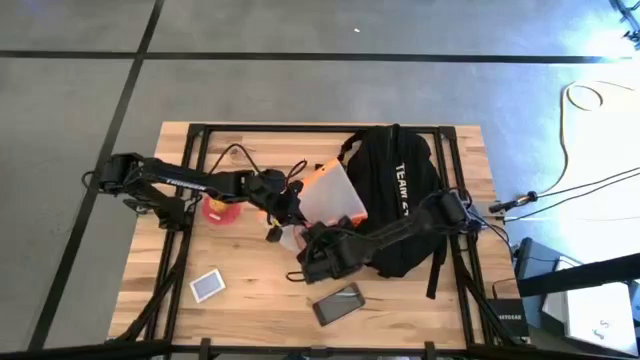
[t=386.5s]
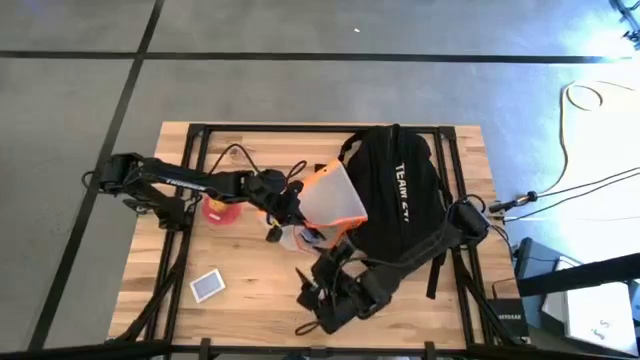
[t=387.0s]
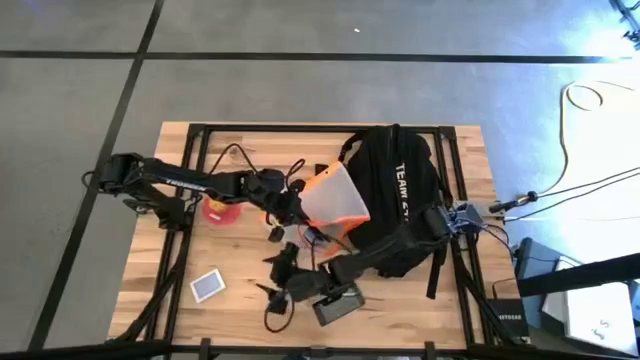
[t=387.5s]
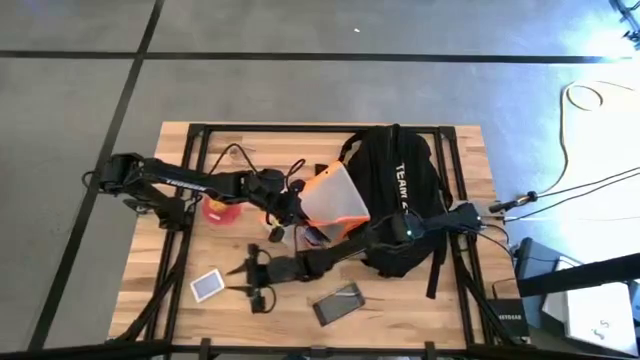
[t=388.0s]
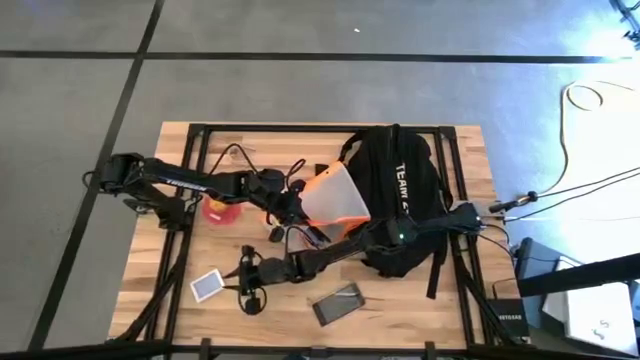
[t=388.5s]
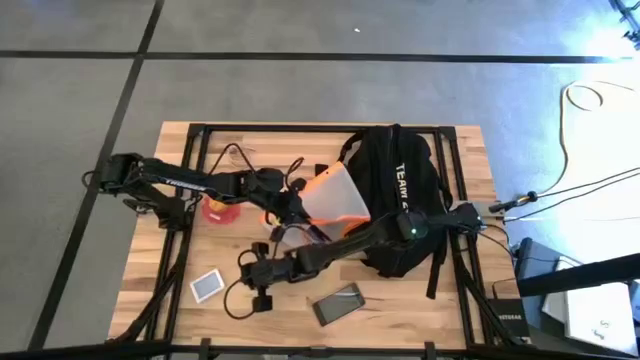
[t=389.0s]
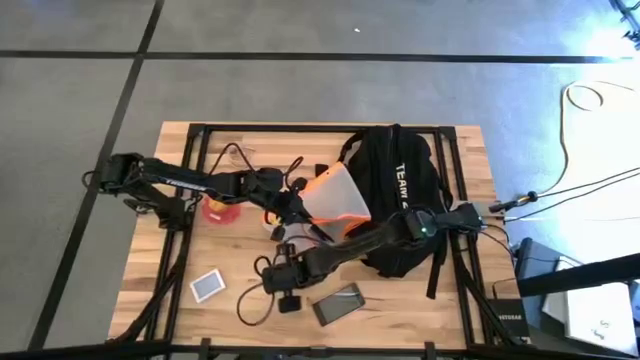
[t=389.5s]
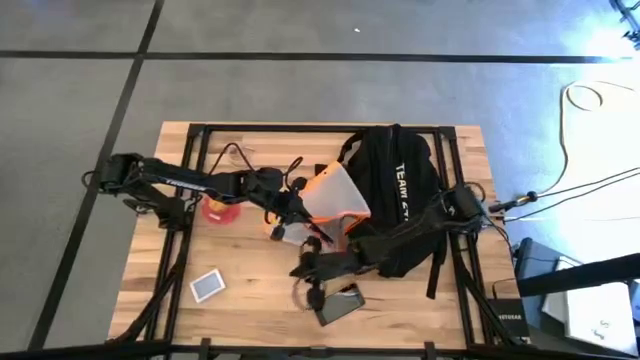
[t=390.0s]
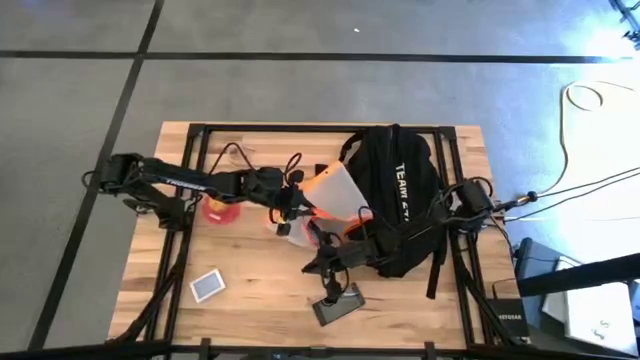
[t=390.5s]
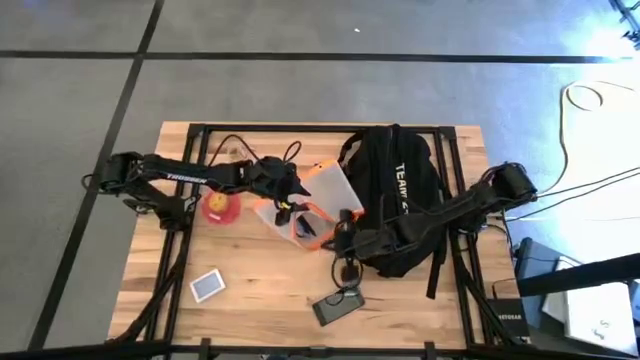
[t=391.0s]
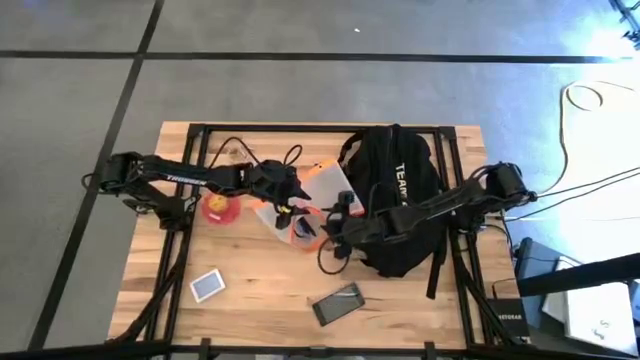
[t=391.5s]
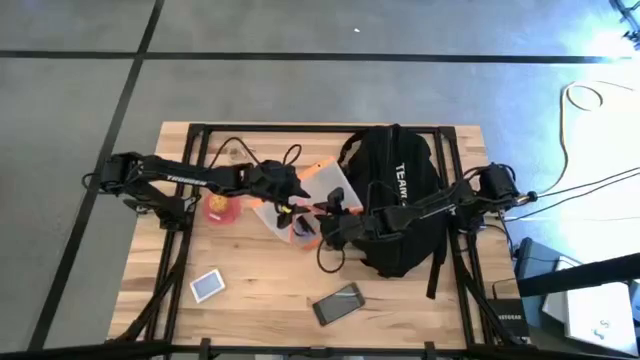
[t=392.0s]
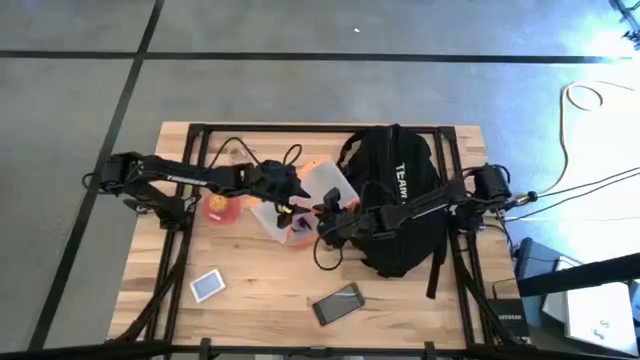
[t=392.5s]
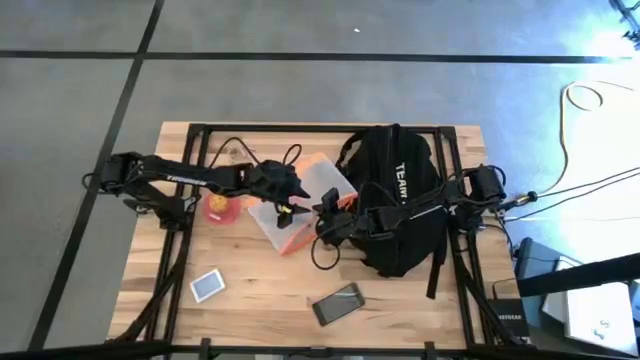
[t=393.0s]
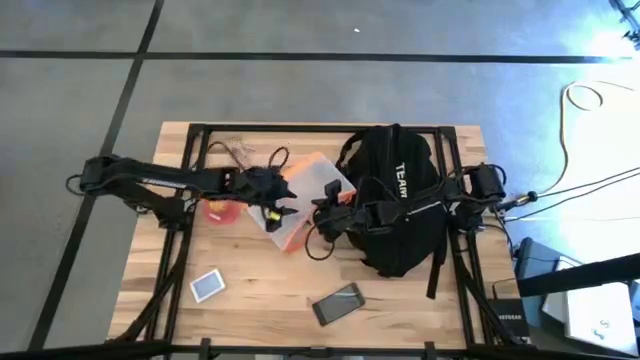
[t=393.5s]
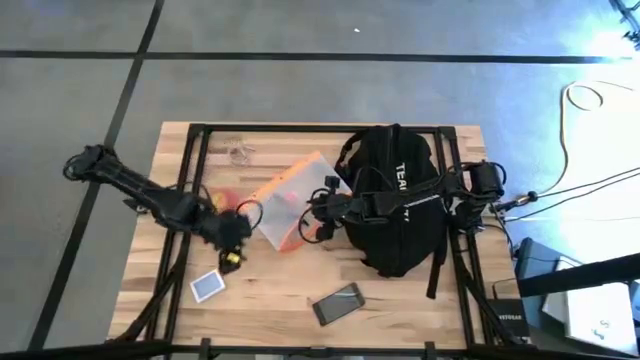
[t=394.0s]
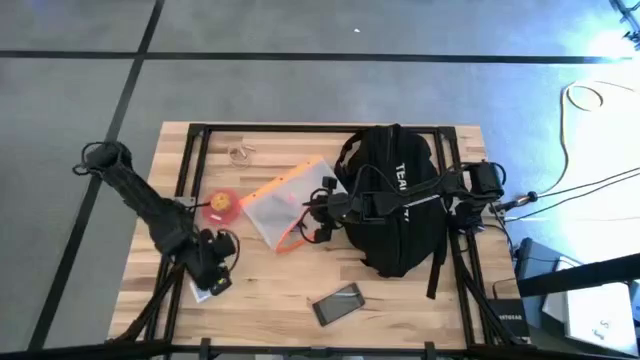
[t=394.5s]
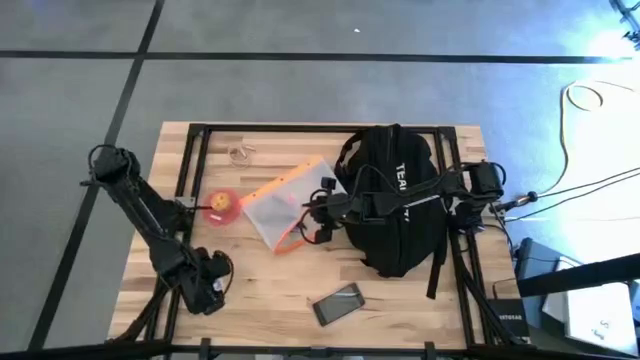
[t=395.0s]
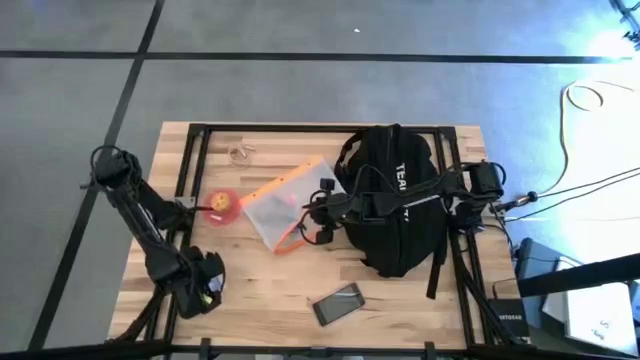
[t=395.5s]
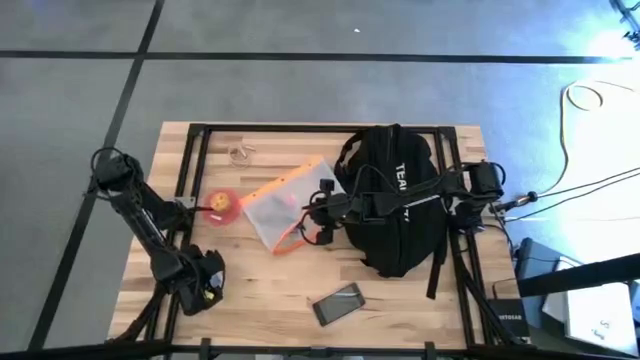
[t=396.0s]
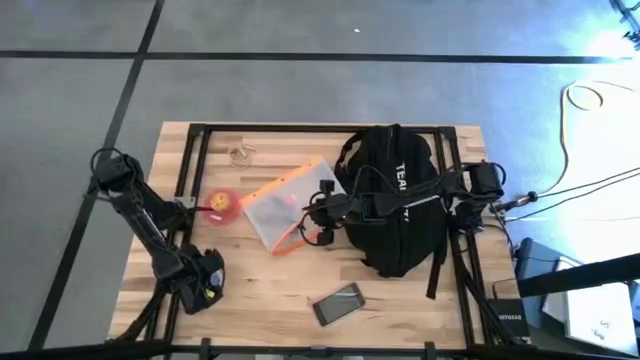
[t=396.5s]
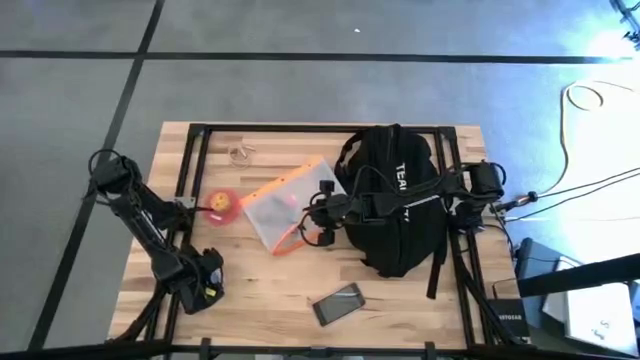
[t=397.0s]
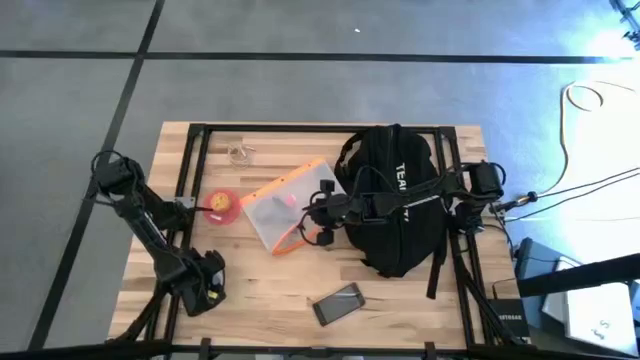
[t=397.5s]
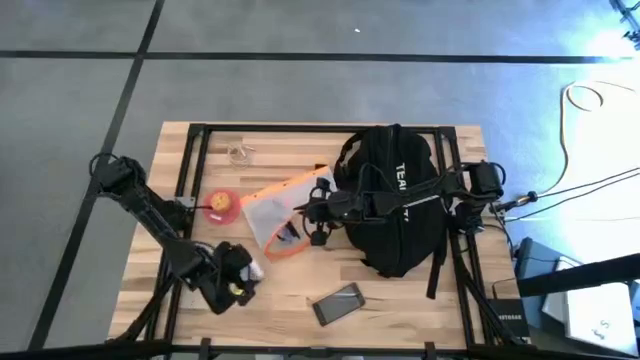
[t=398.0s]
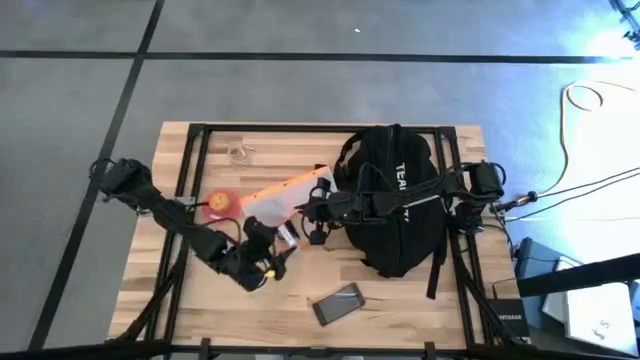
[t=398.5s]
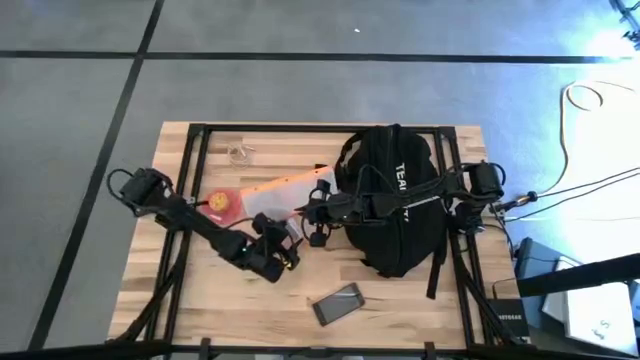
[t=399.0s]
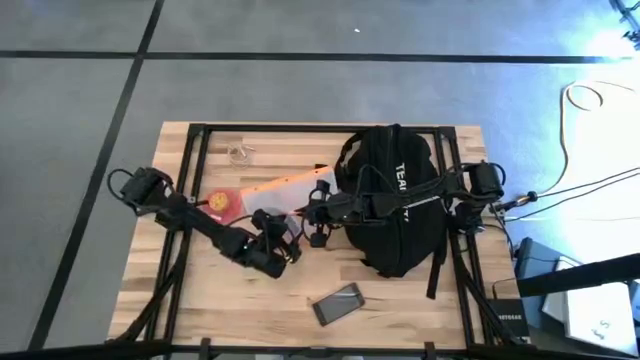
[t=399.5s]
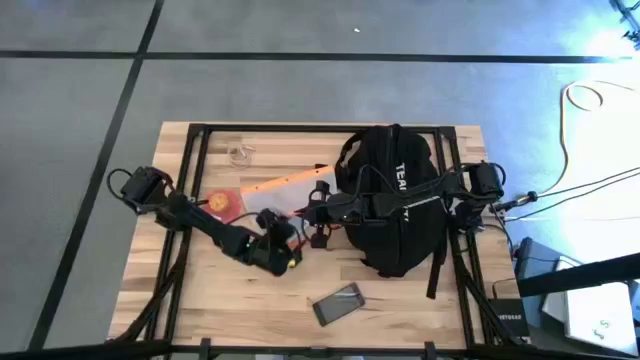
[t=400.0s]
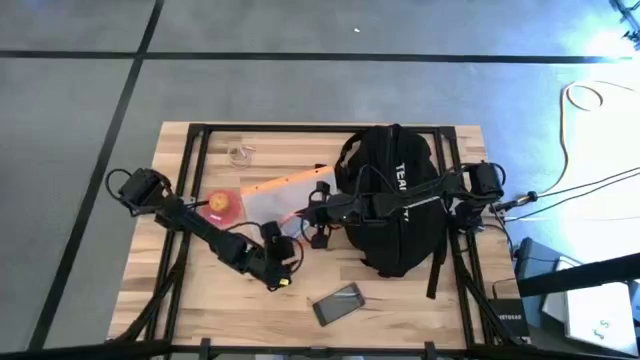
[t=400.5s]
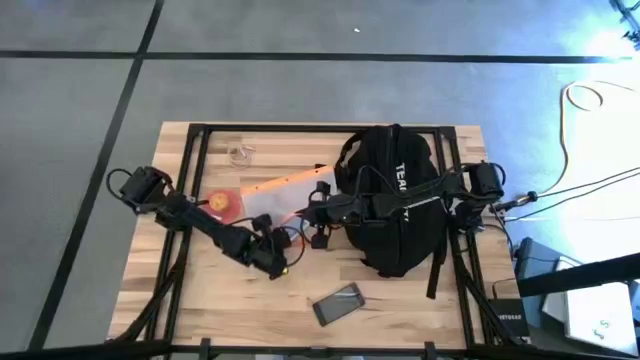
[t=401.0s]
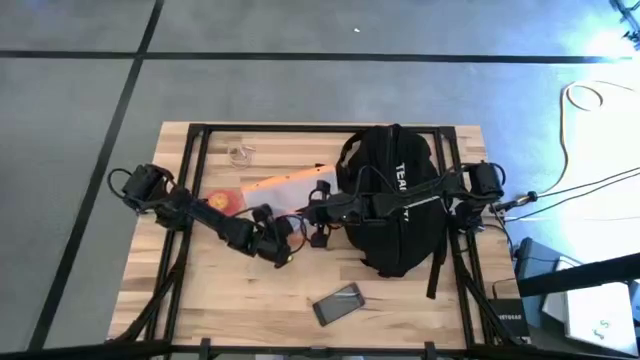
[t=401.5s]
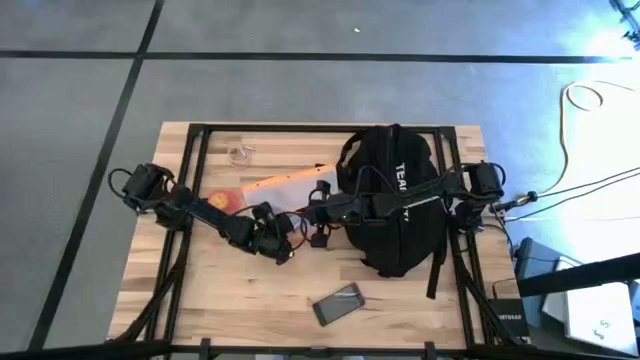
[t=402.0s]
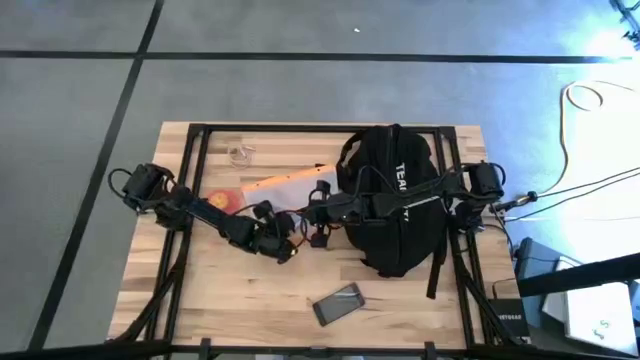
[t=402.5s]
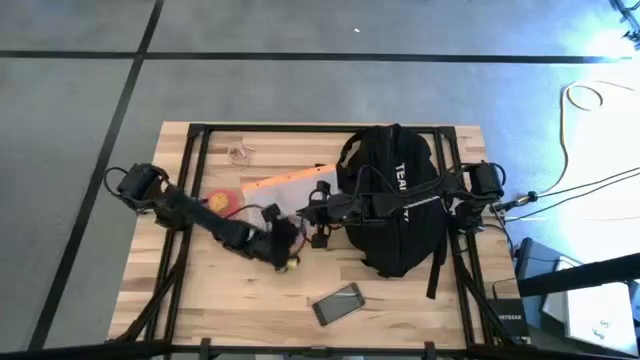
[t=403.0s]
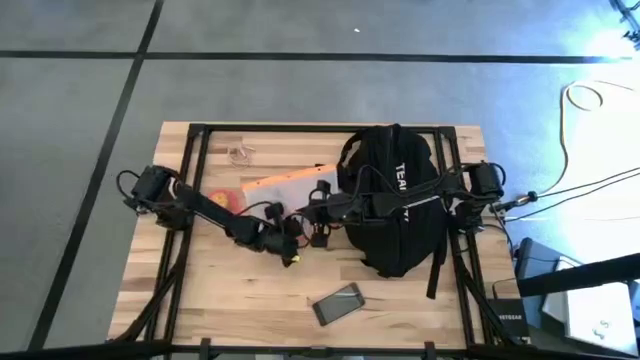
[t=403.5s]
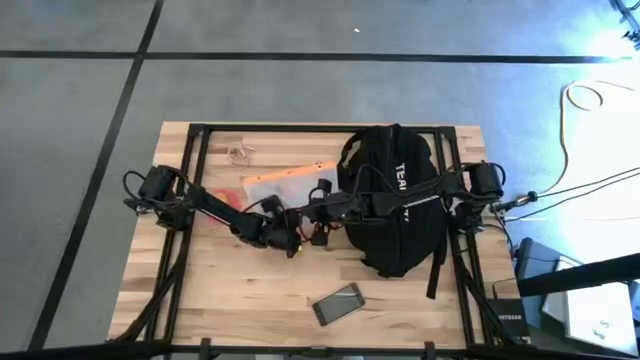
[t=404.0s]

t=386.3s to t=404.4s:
Task: Unpack backpack
Put the blue game card deck into the transparent white zip bag

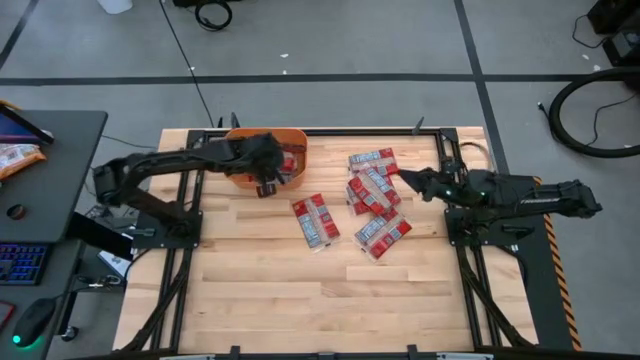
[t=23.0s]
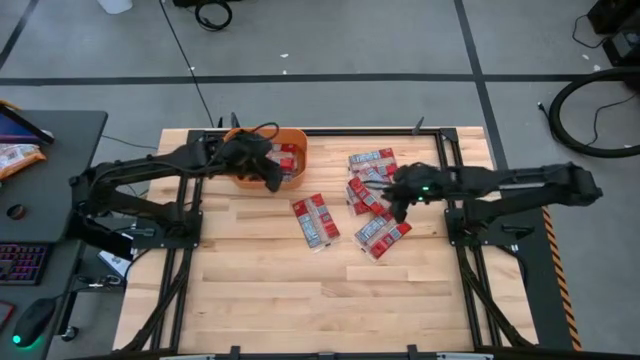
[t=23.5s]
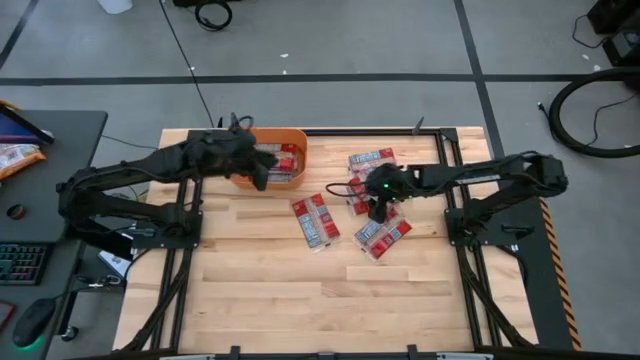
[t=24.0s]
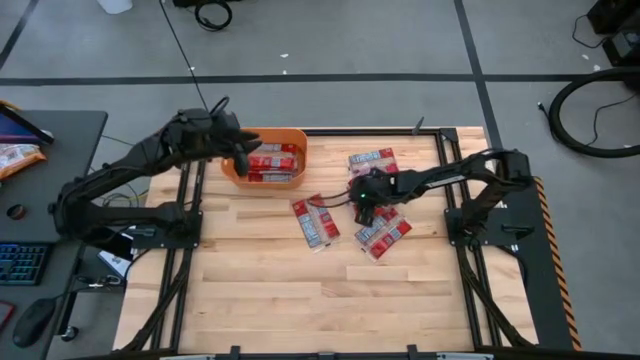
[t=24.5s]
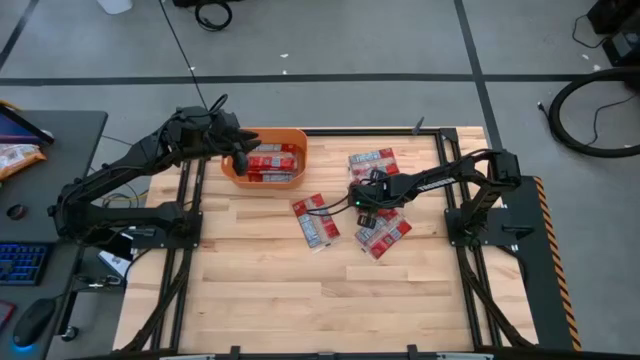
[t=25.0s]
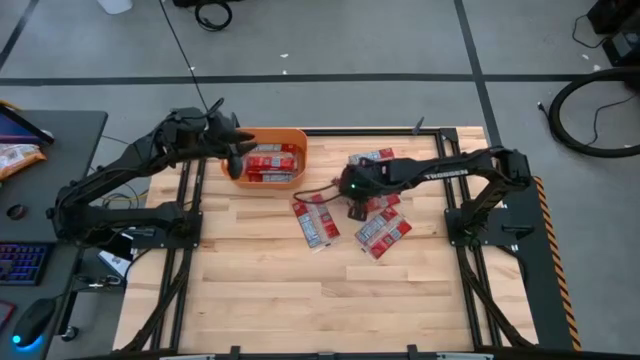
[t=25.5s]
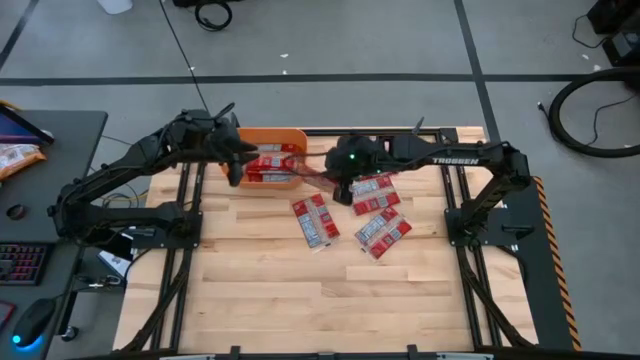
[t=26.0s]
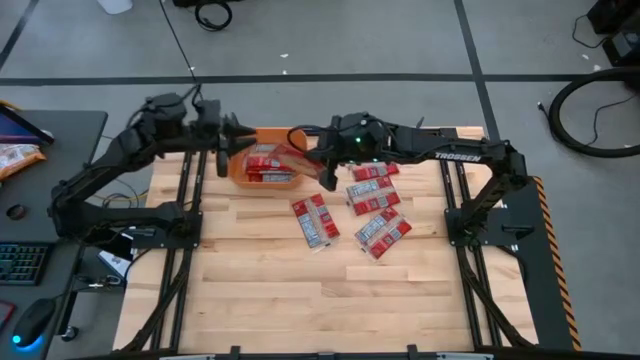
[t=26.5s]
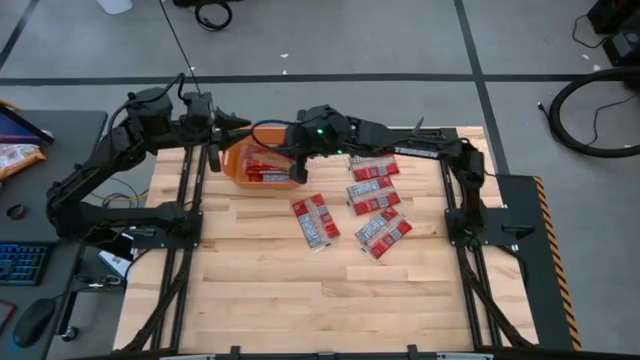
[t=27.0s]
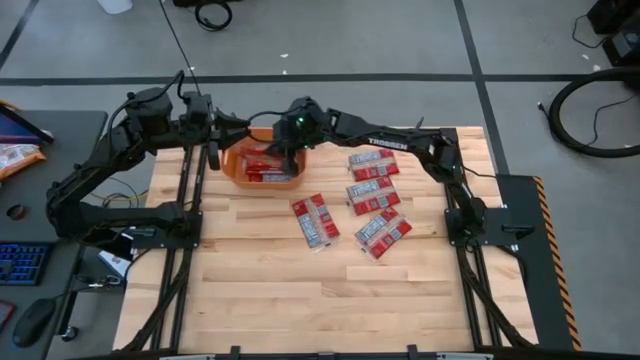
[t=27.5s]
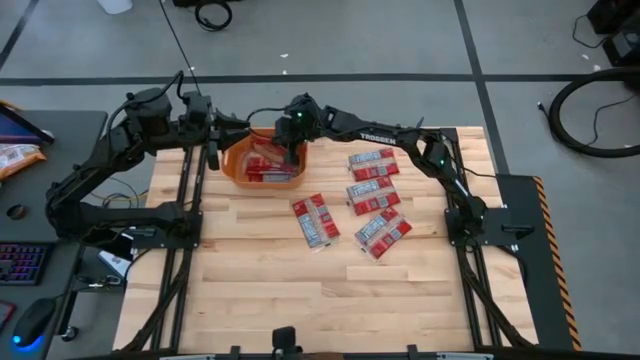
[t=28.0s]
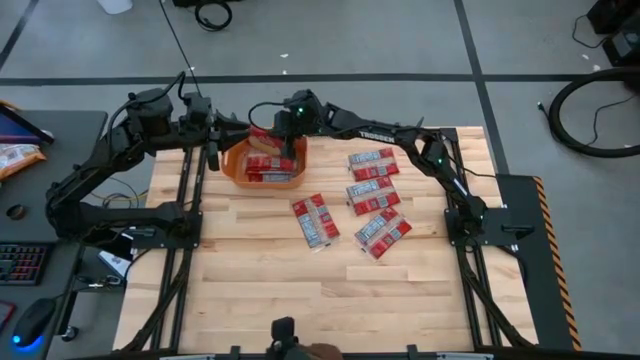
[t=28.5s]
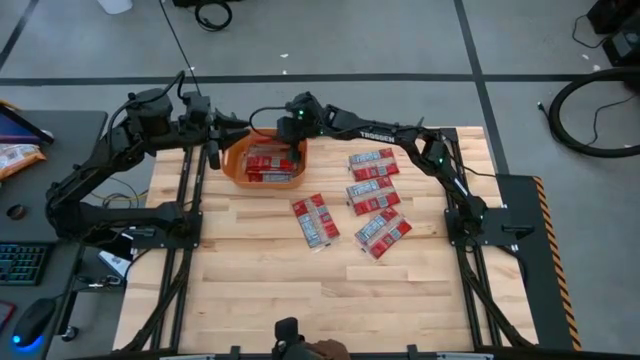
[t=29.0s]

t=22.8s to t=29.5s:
Task: Sort popcorn bags into baskets
Put the red popcorn bag into the orange container
